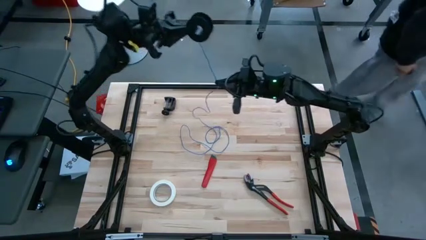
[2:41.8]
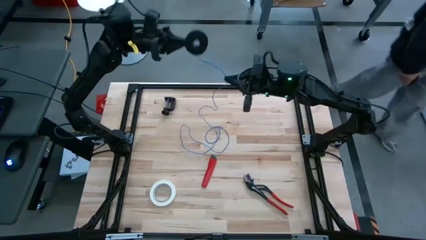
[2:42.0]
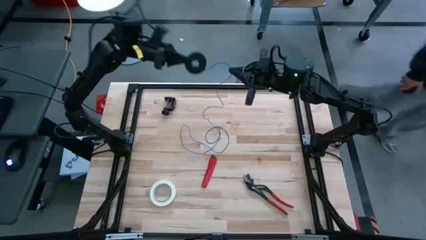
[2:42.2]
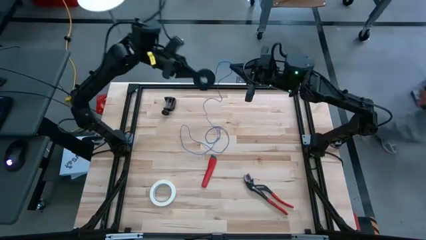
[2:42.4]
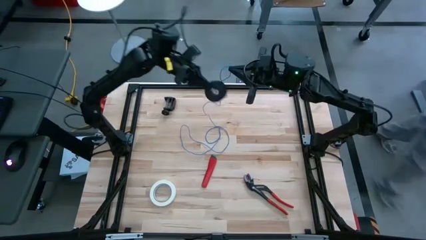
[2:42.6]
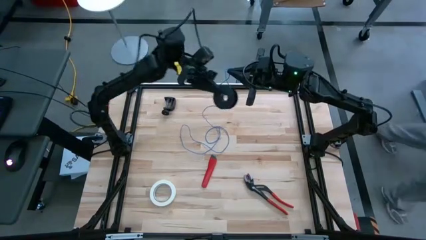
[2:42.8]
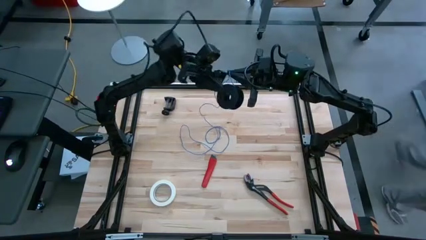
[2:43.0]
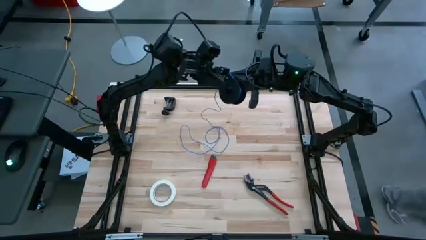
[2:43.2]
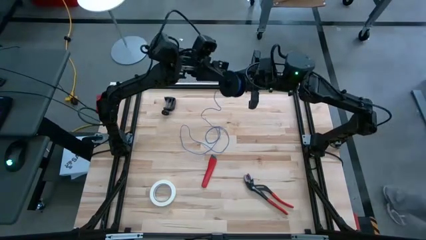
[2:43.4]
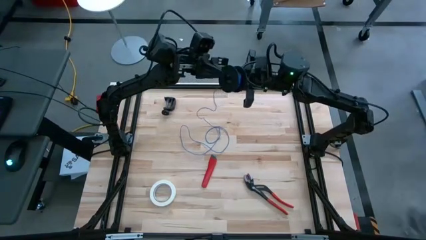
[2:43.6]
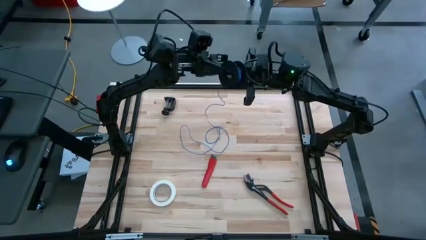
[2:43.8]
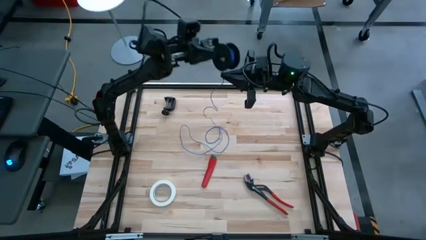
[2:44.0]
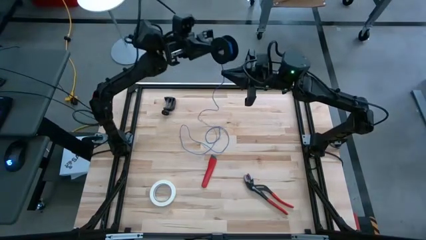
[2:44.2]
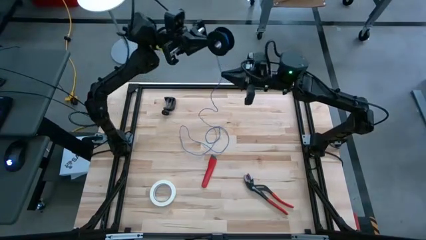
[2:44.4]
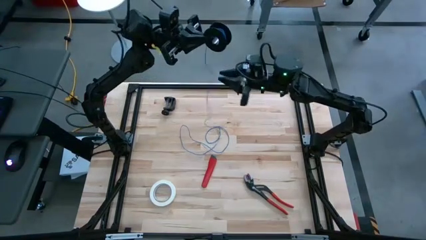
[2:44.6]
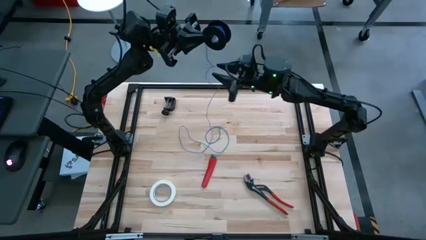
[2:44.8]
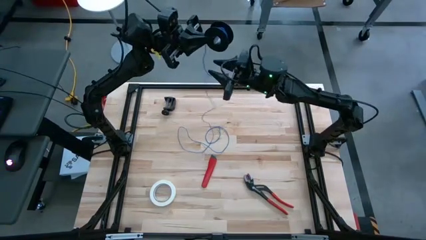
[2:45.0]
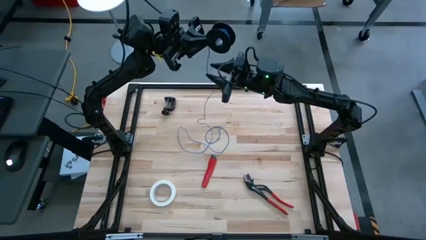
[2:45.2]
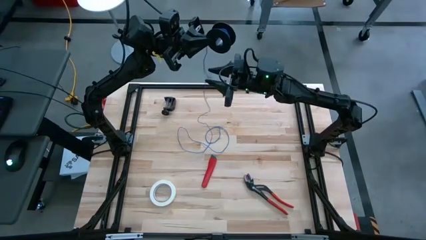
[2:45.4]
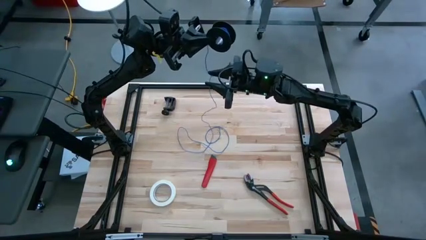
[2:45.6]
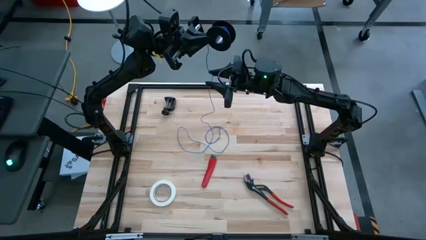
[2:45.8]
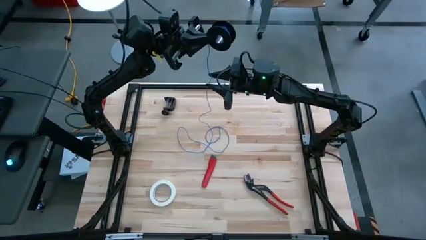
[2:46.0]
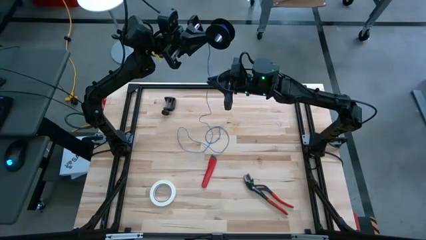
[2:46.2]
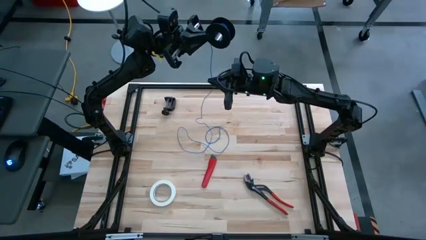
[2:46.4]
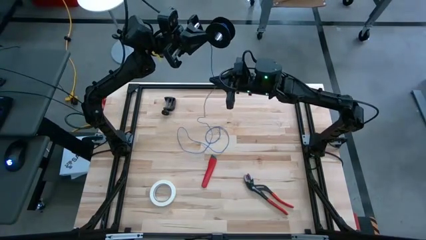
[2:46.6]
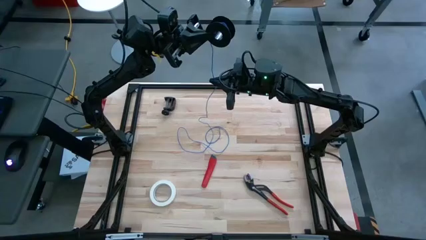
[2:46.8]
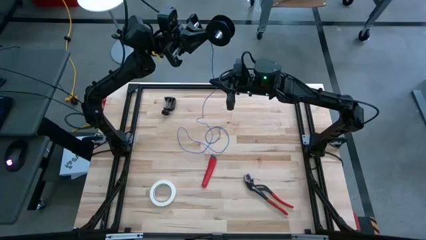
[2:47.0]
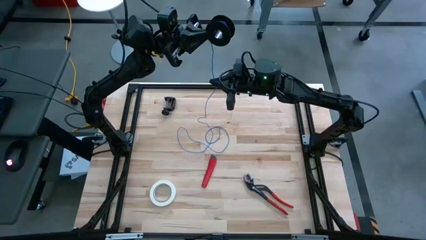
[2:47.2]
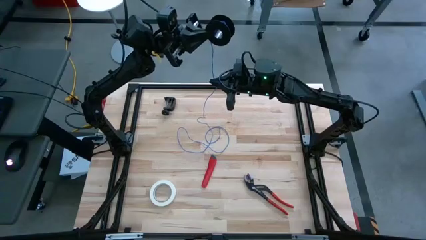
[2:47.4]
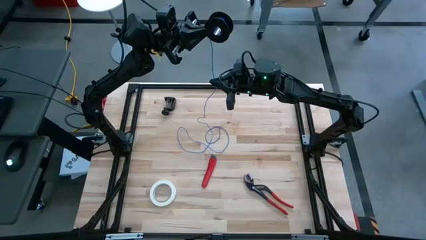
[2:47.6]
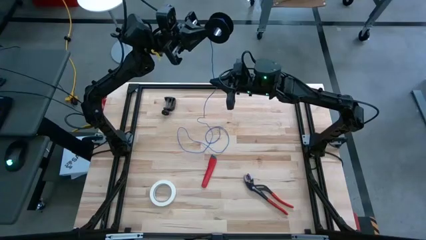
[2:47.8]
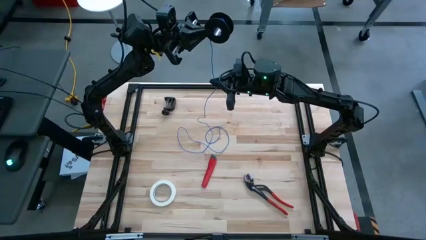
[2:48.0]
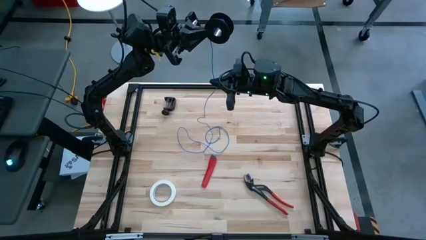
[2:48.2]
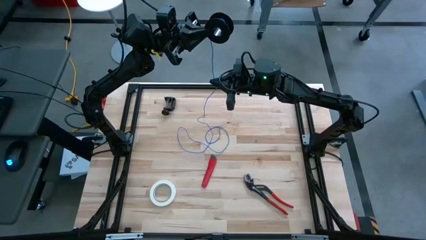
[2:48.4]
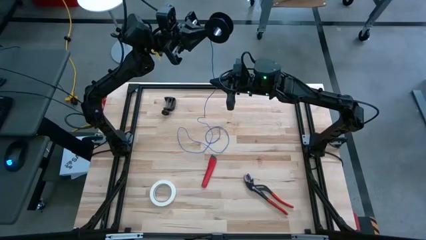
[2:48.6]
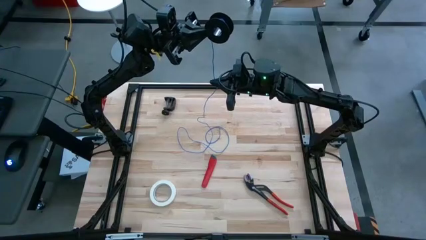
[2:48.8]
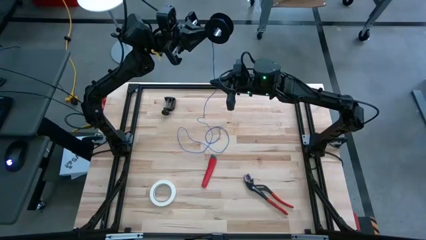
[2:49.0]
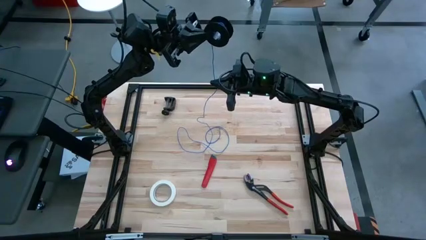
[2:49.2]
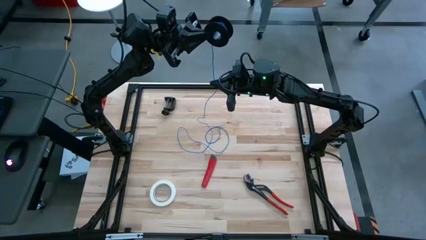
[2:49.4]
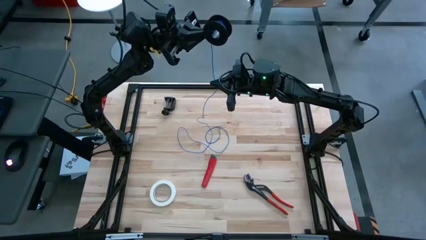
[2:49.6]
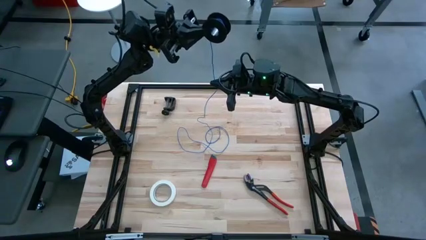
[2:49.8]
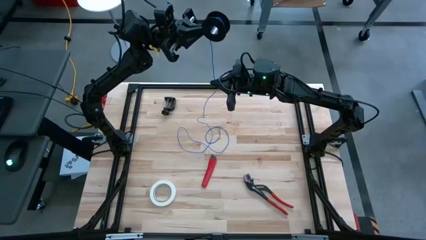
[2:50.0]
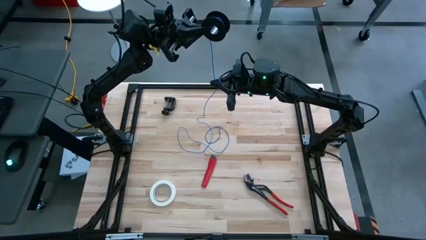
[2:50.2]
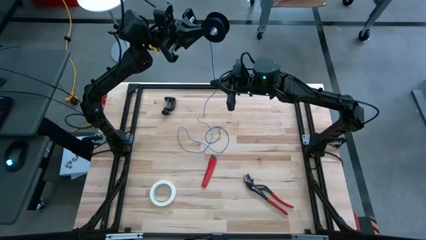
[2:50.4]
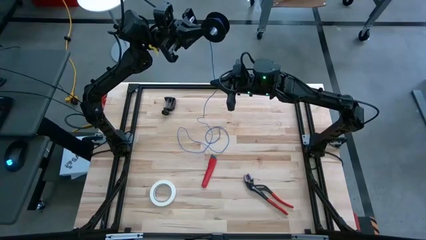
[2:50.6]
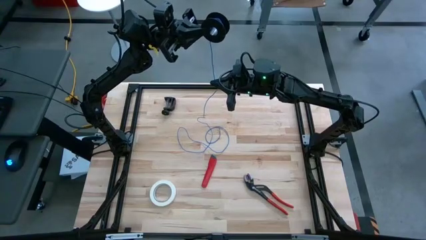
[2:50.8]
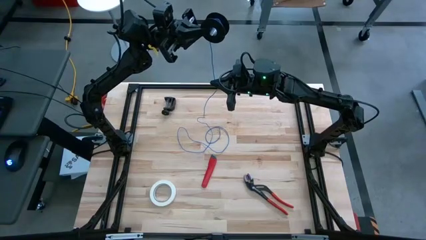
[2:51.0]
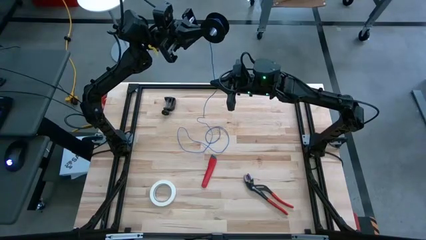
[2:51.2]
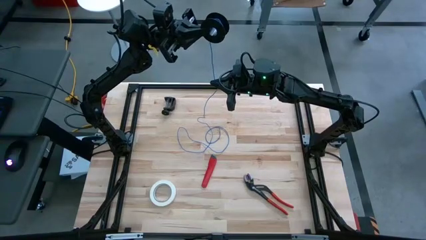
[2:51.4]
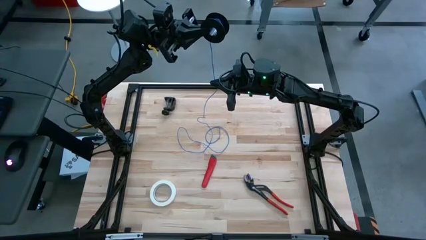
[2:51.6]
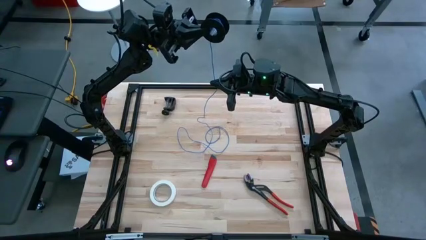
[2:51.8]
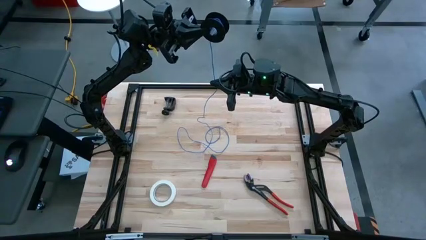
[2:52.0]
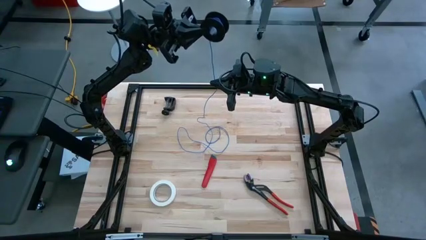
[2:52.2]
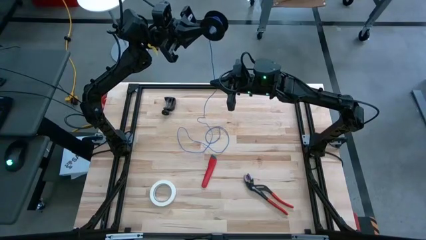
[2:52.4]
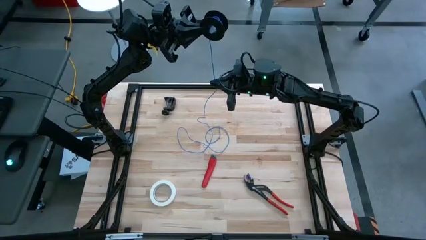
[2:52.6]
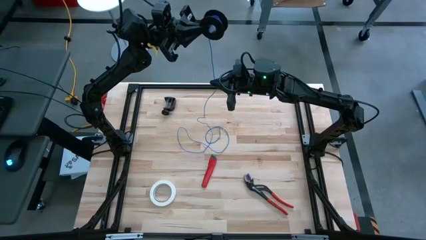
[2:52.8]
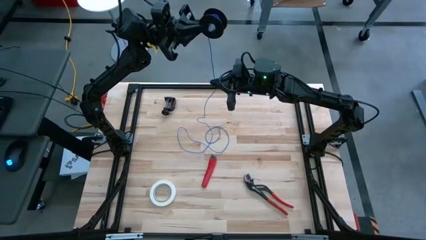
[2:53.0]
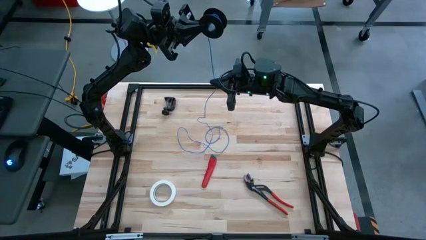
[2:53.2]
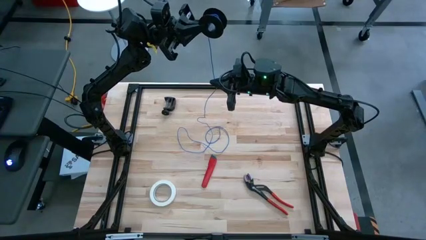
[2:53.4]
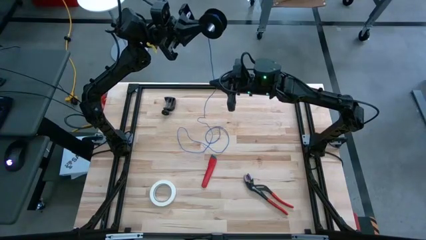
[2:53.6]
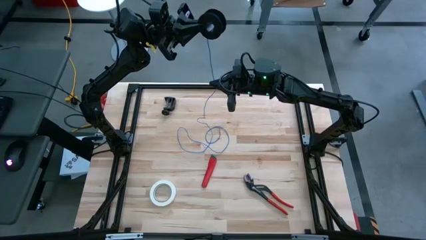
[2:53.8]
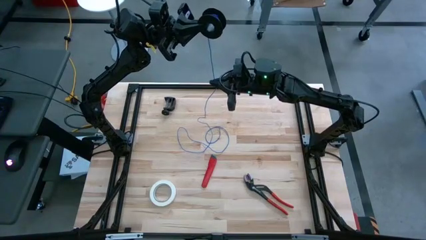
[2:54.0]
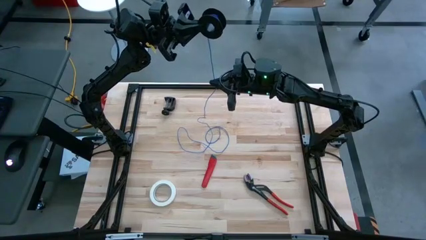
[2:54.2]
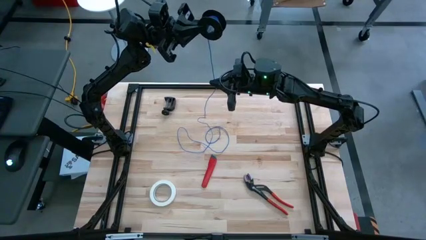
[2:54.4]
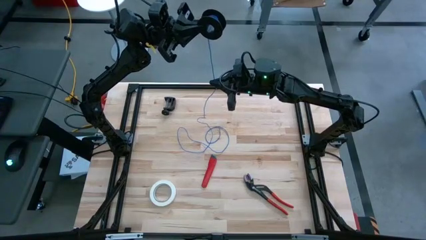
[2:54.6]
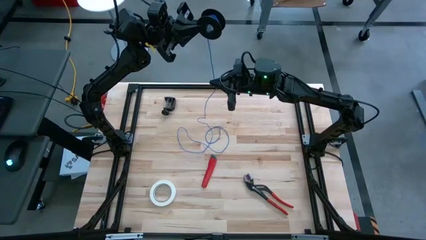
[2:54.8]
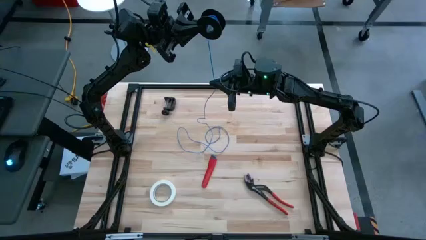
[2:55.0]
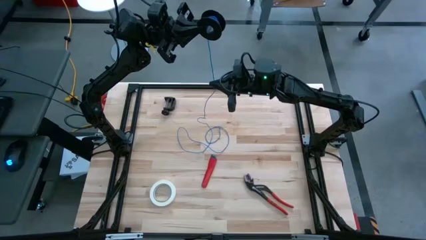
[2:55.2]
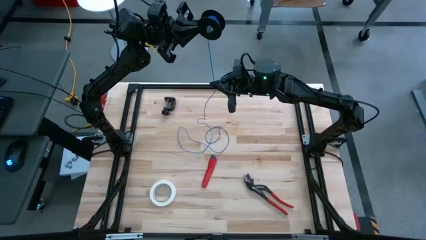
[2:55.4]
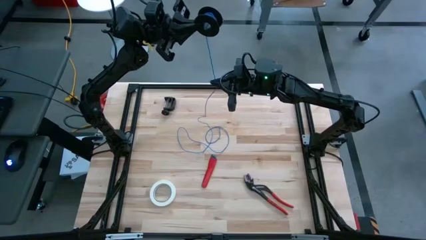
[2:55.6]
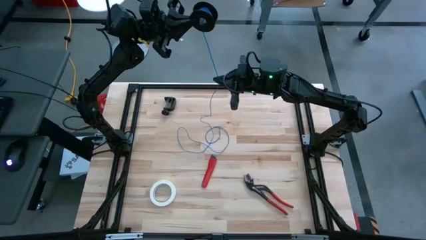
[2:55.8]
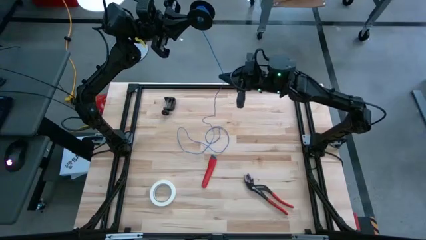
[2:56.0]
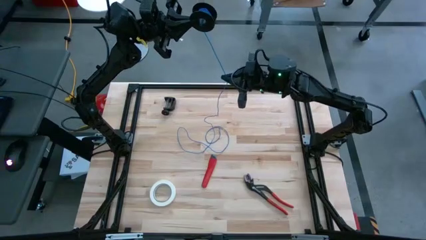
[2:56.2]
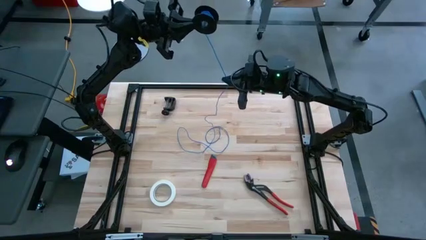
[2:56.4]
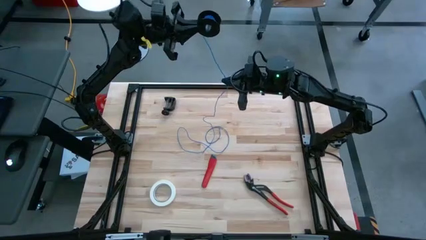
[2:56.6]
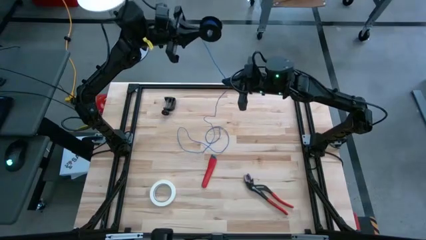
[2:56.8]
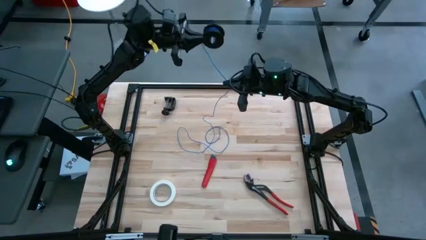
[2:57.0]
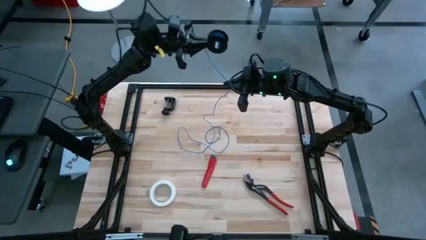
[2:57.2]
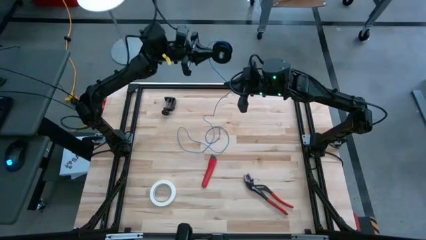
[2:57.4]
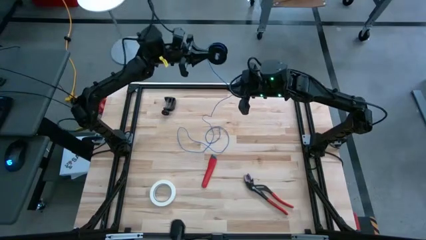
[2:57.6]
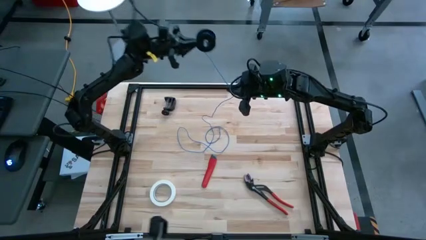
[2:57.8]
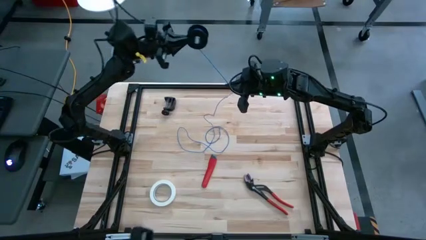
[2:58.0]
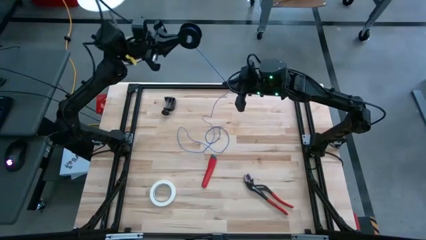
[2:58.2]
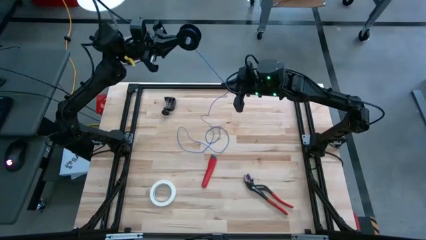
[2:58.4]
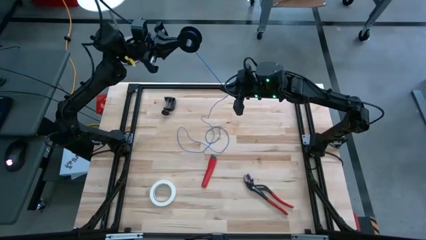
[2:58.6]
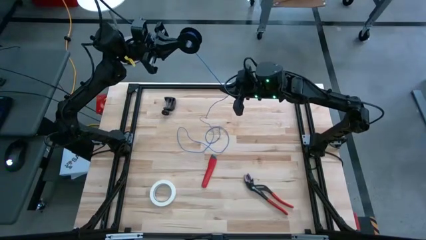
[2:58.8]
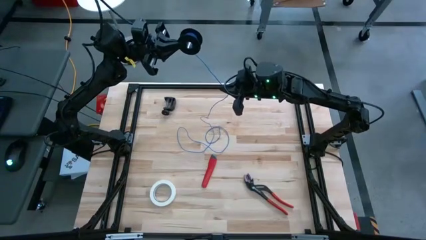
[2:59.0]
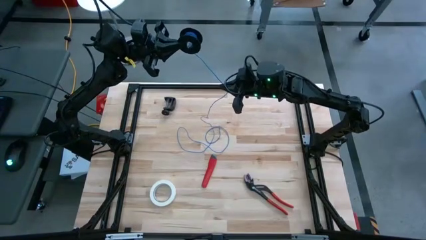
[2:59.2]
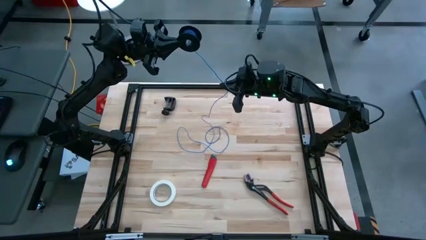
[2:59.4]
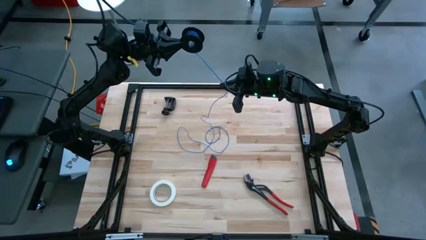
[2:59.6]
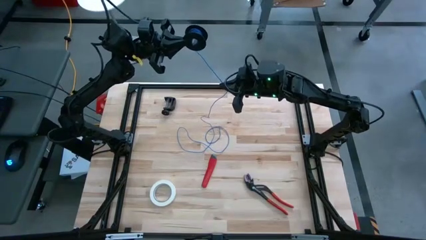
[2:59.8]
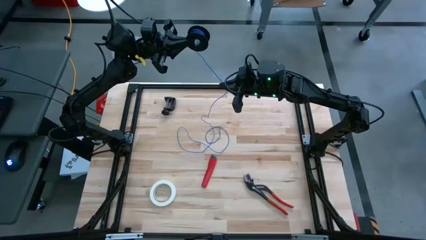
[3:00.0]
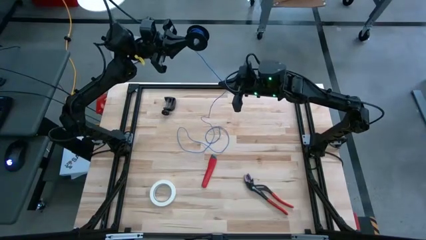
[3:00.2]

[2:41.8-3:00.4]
Task: Coil cords
Coil the blue wire cable onto the black spool
